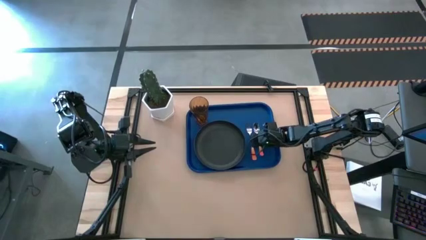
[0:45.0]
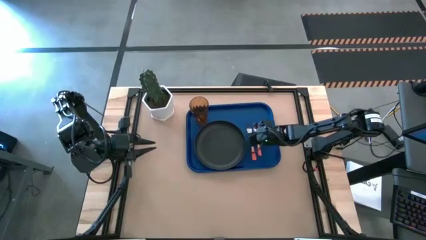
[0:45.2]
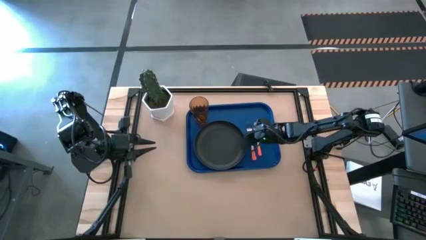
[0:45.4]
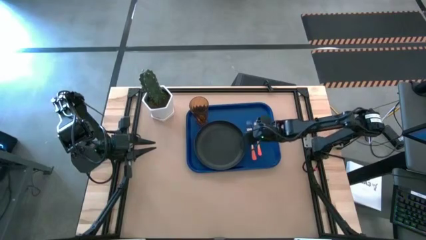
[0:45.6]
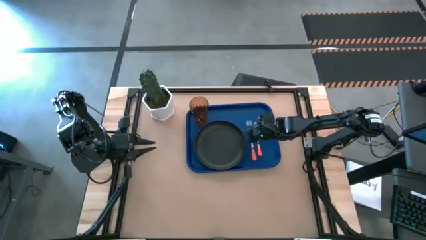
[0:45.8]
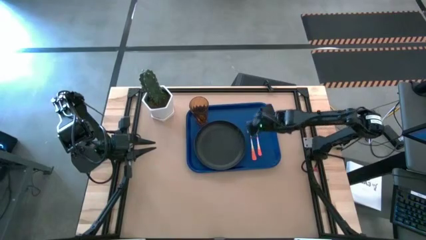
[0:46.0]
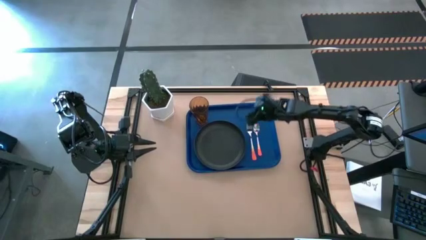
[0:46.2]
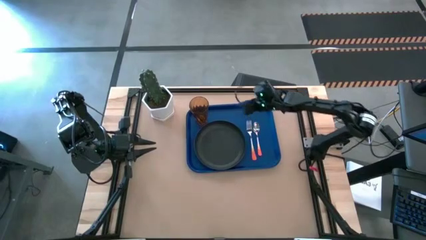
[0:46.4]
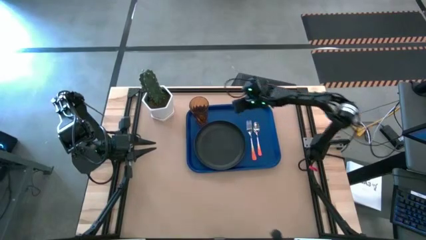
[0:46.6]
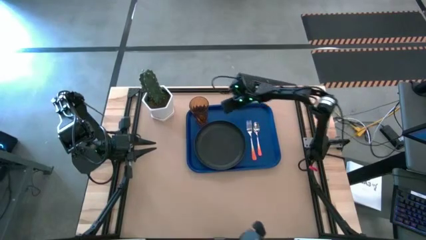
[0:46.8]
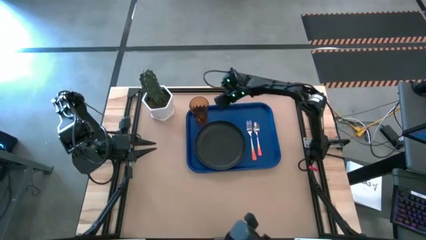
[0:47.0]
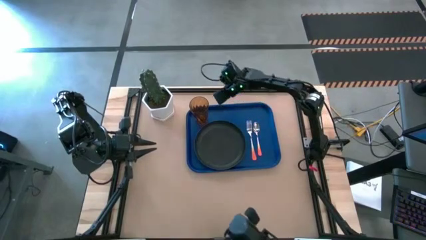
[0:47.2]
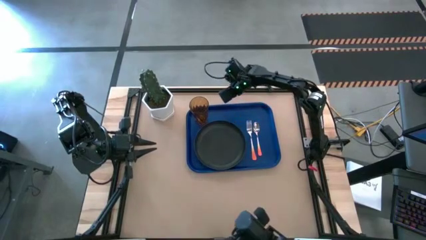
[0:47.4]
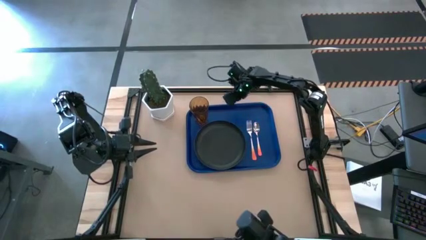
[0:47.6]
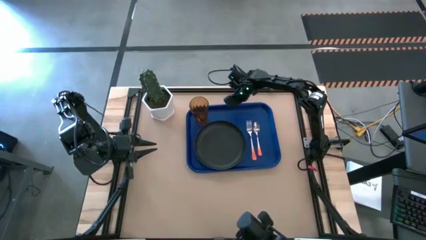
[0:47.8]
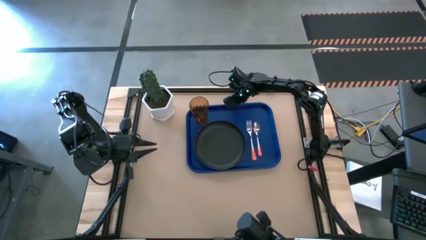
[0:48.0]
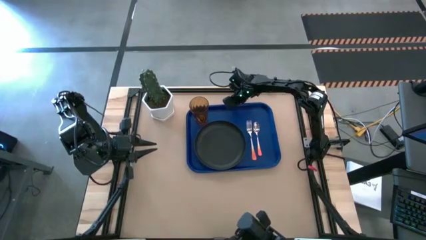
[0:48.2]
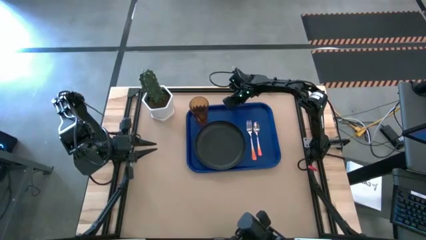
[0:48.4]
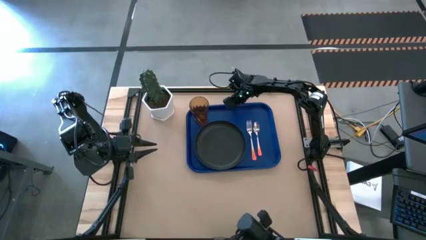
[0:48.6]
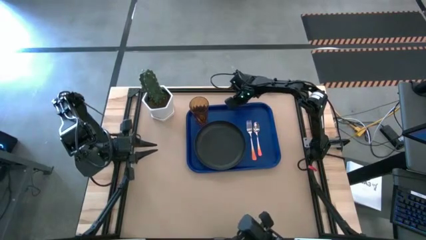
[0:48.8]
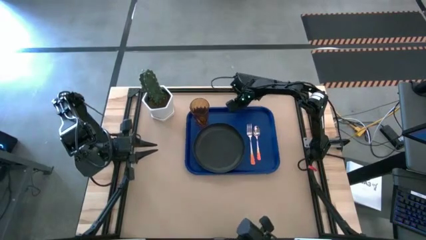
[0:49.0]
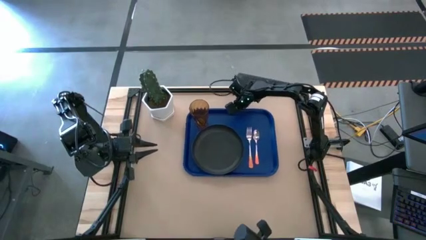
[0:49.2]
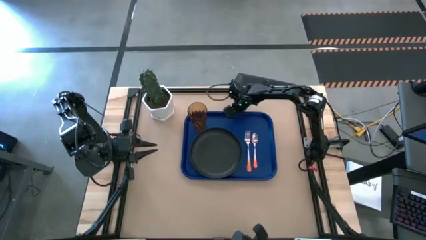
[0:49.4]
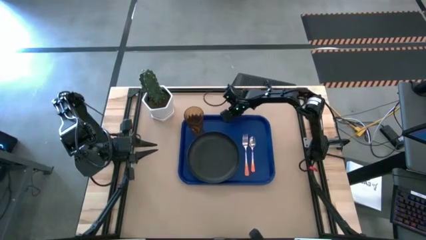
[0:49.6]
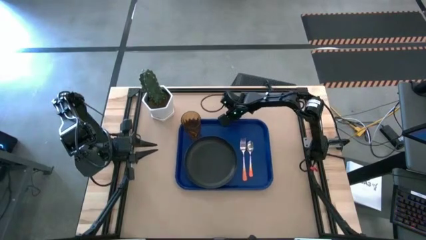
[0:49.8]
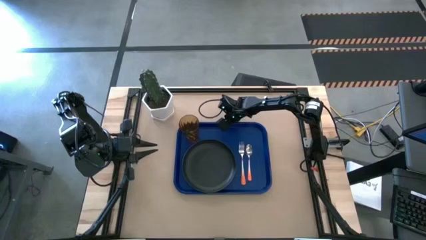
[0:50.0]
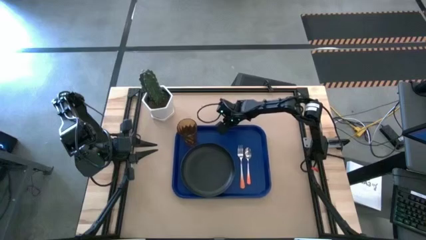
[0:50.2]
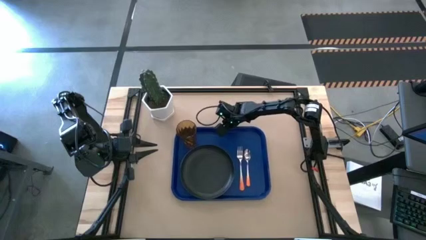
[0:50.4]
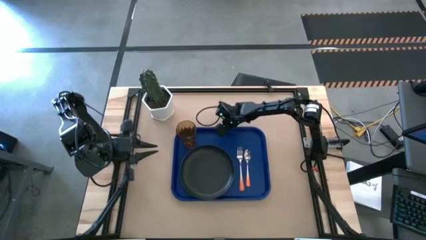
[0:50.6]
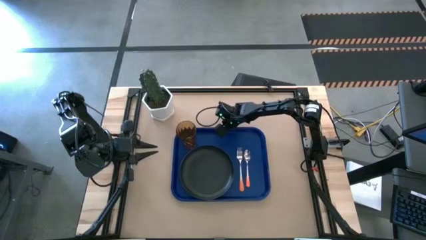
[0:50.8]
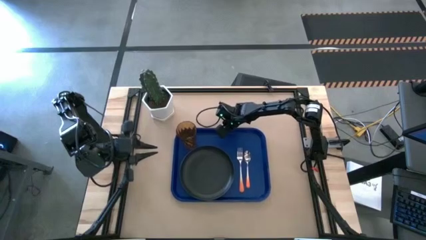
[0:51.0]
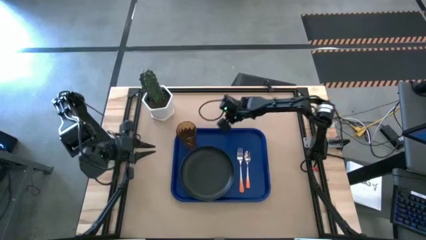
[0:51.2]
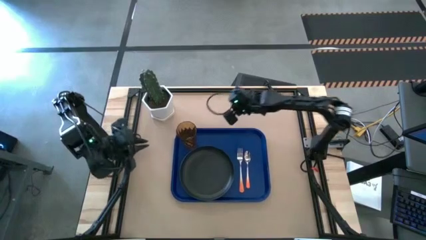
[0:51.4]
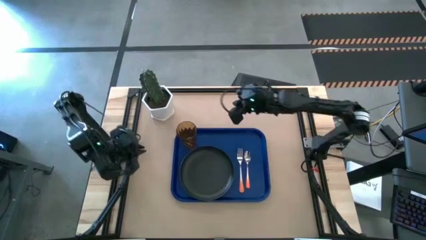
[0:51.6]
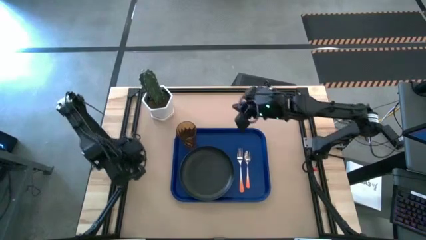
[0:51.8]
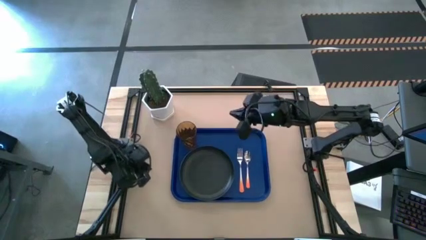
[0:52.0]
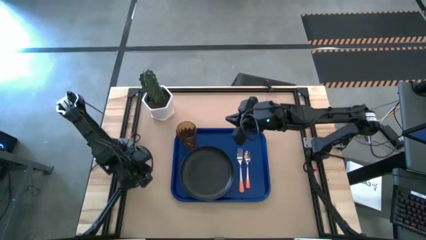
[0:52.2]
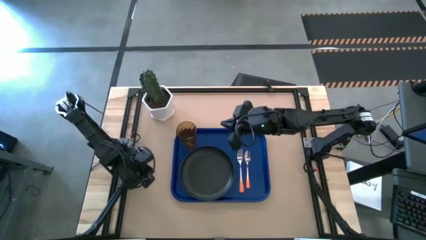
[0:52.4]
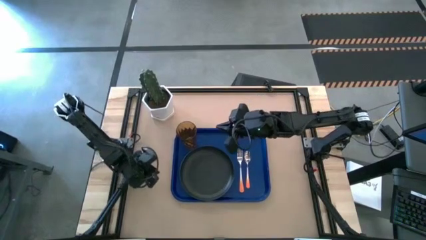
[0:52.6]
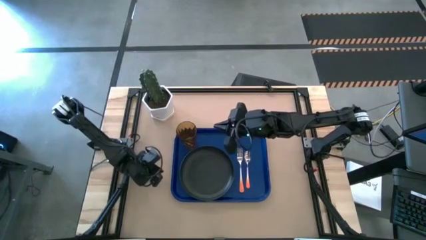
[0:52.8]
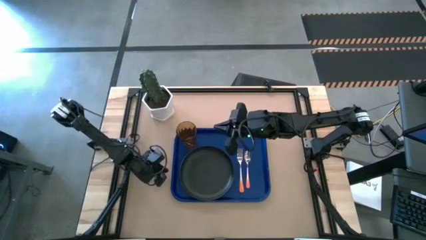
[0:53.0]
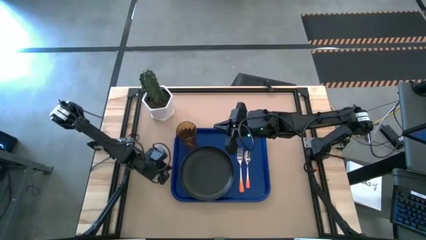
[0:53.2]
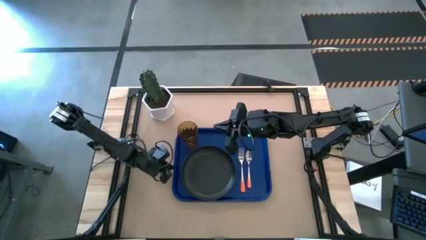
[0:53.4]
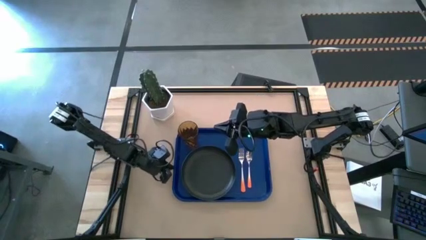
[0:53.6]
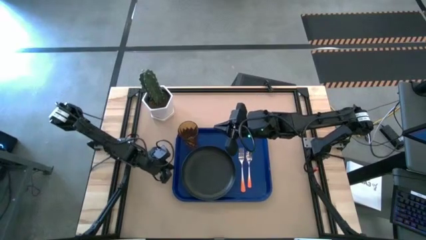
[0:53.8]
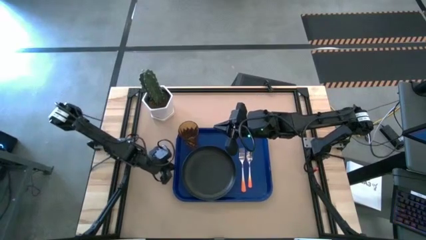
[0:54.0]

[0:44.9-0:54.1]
Task: Pick and place plate/cup/fork/spoon on tray
Move the blue tray to the center of the table

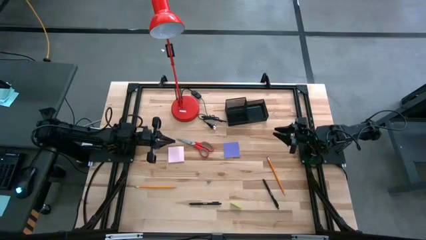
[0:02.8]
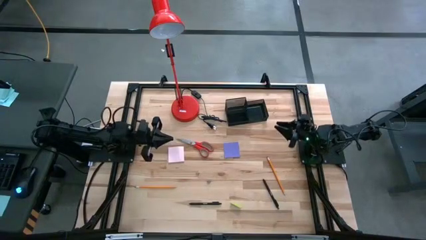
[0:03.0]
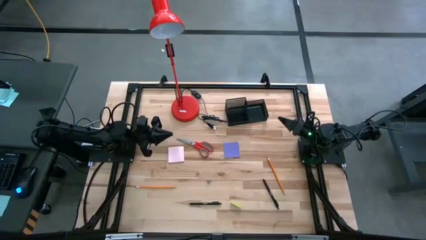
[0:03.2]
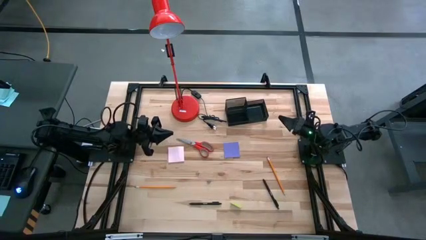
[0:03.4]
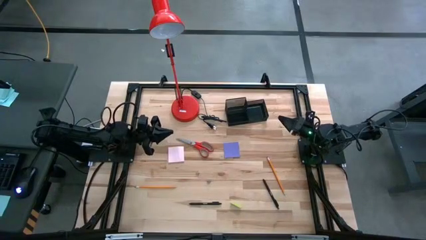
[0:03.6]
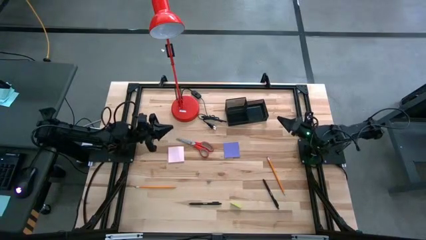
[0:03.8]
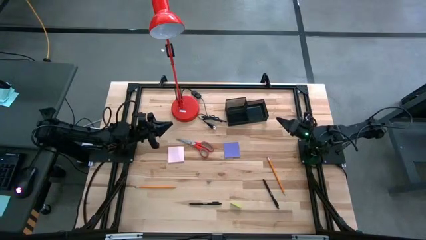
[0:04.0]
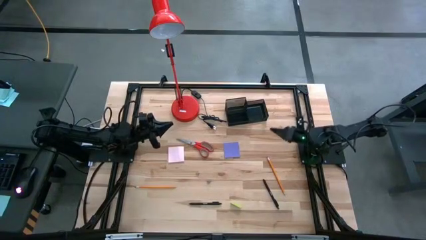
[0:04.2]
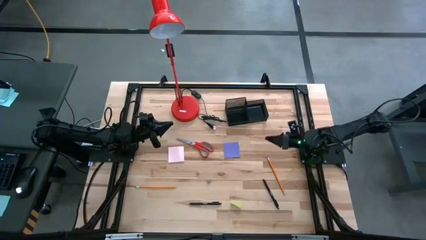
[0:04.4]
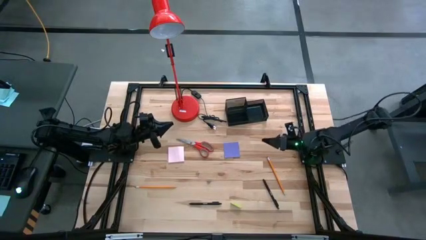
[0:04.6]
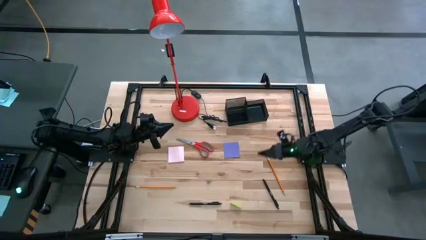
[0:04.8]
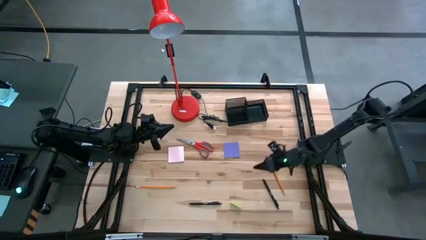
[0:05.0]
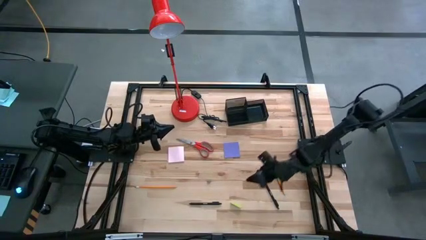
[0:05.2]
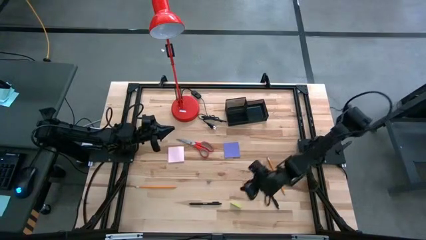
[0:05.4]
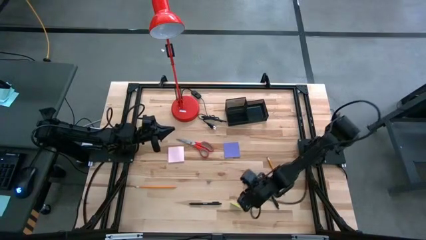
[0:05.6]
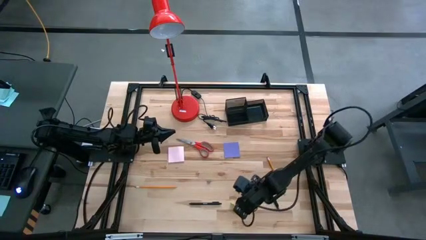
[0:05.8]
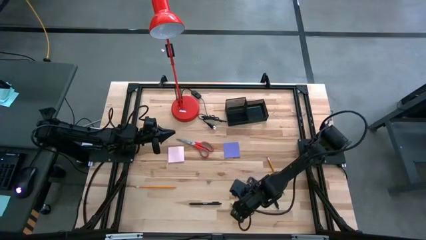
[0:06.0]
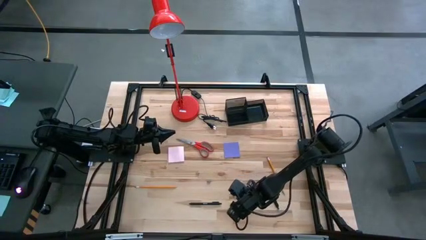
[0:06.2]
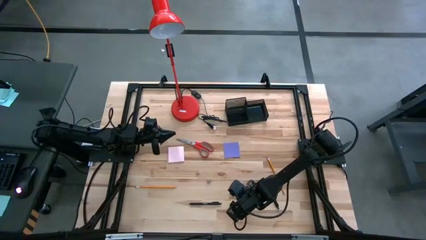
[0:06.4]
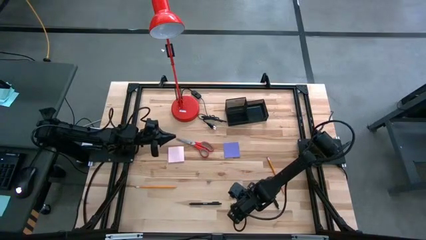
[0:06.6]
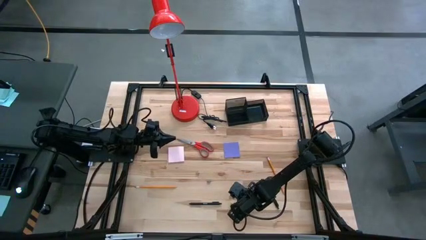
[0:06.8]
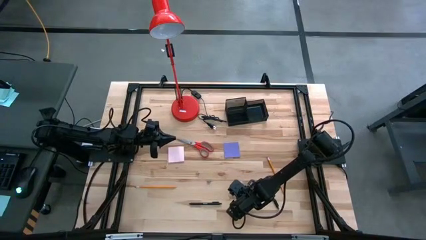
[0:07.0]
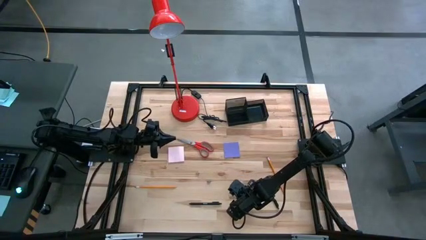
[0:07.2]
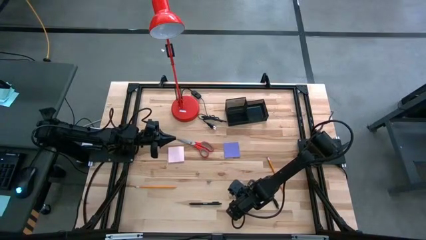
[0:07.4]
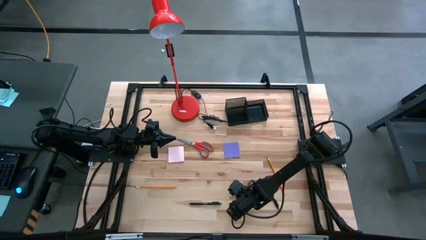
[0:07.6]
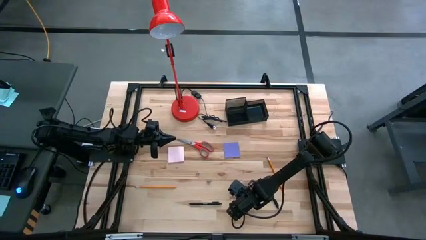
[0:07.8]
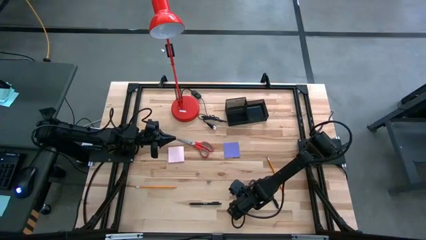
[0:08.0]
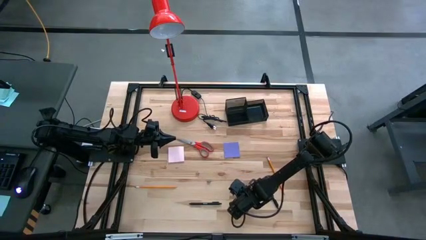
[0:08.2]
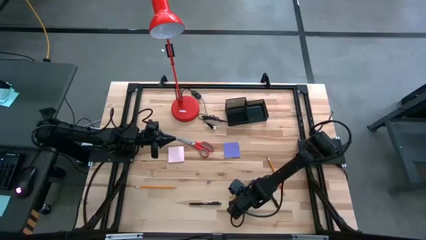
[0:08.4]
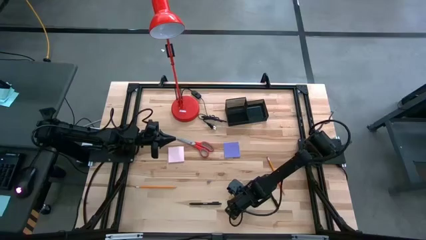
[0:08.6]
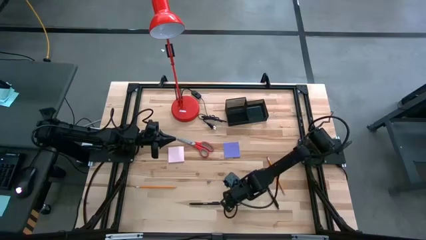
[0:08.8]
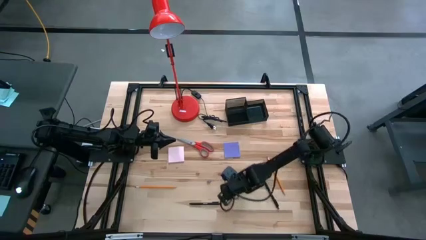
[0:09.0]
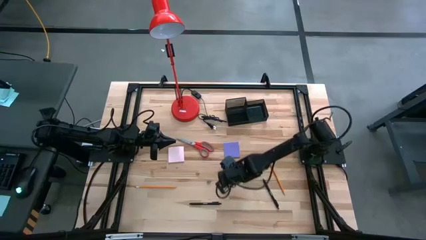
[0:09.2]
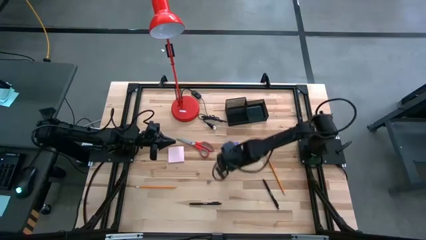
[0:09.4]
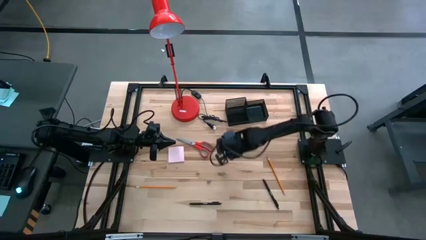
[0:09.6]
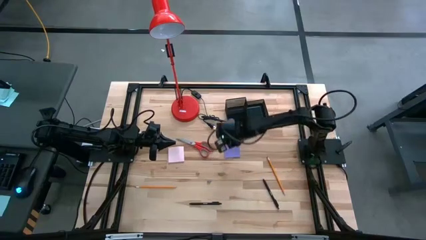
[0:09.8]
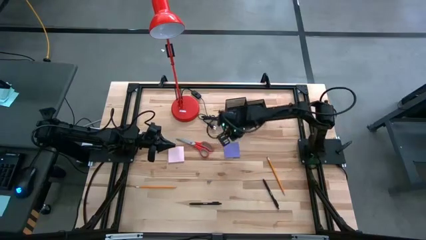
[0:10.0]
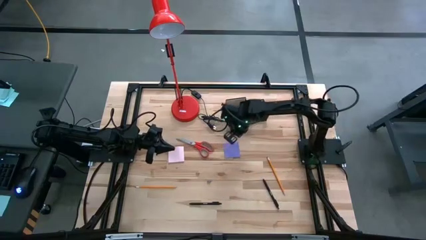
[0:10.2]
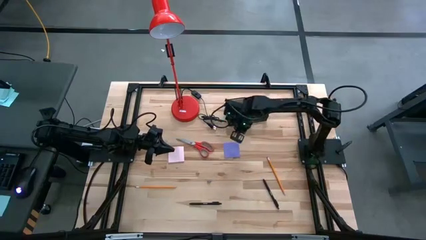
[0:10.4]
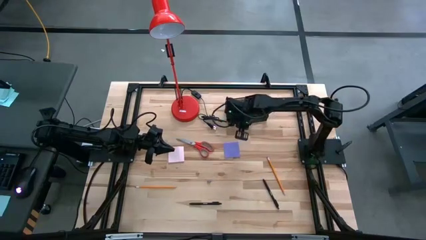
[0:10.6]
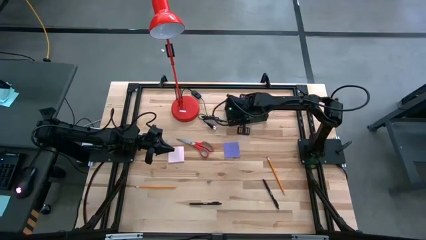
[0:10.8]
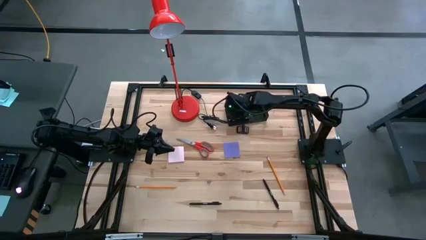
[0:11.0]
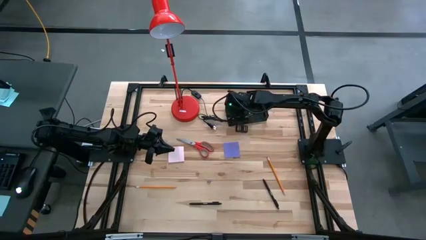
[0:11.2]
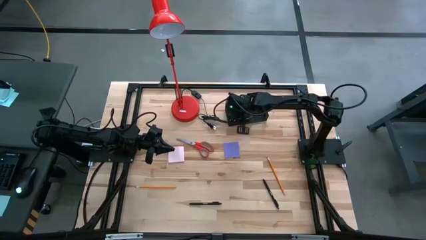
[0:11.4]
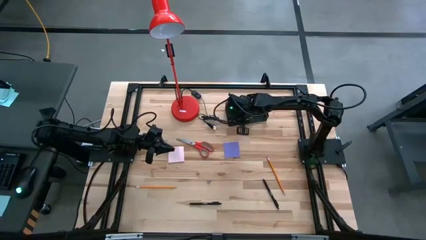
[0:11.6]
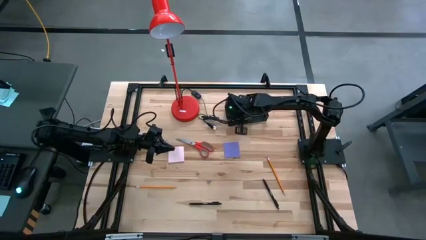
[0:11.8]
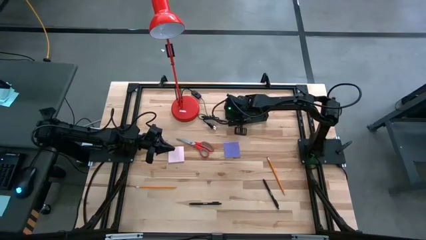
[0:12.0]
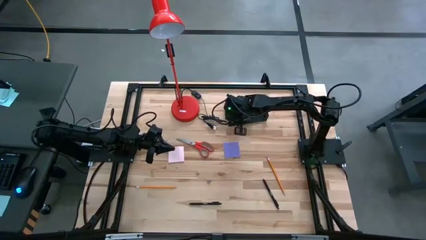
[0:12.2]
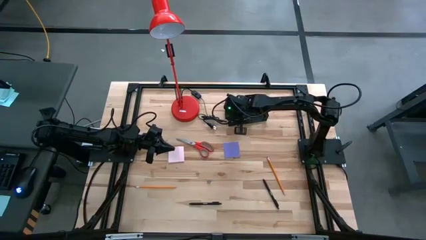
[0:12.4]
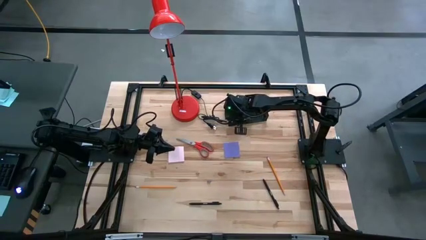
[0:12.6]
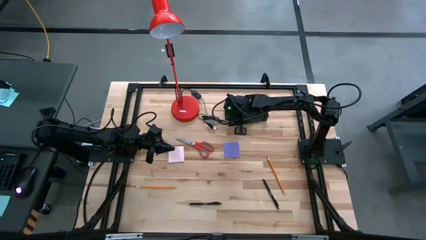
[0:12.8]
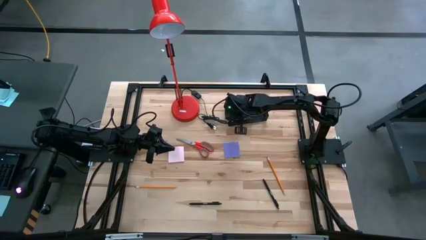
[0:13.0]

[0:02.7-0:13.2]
Task: Pick and place office supplies into organizer
Put the light green eraser into the black desk organizer
